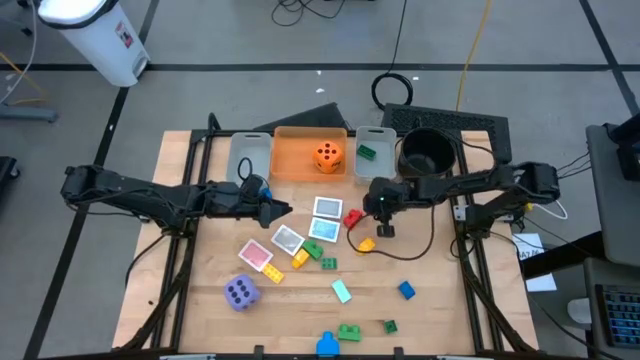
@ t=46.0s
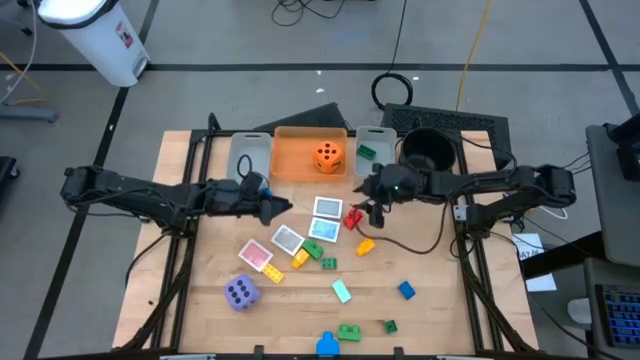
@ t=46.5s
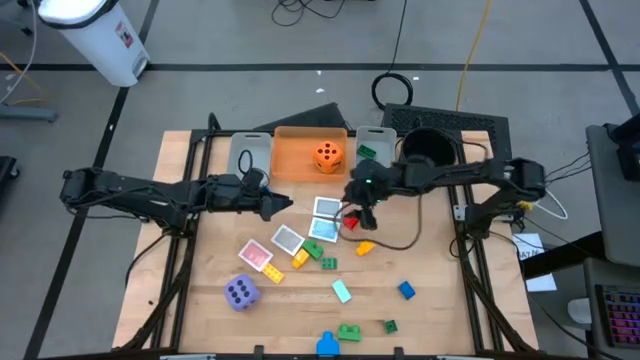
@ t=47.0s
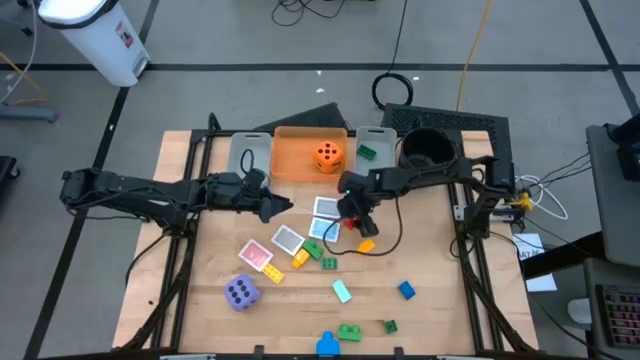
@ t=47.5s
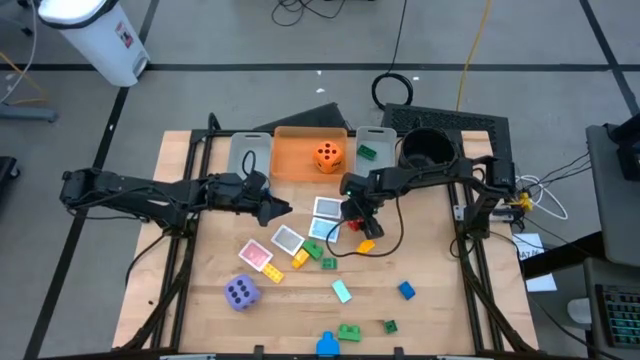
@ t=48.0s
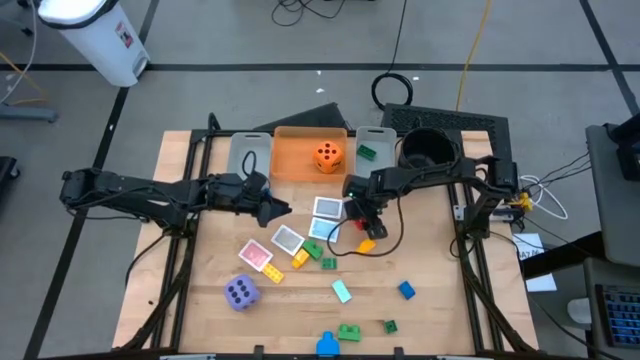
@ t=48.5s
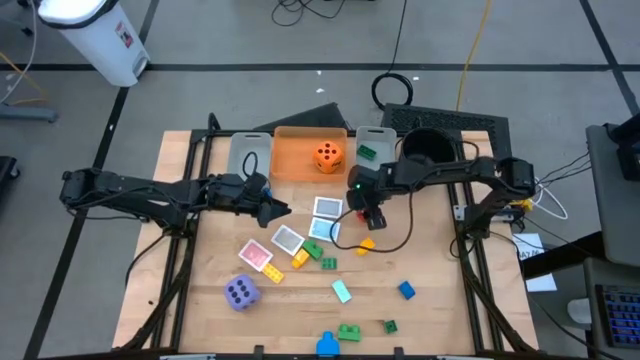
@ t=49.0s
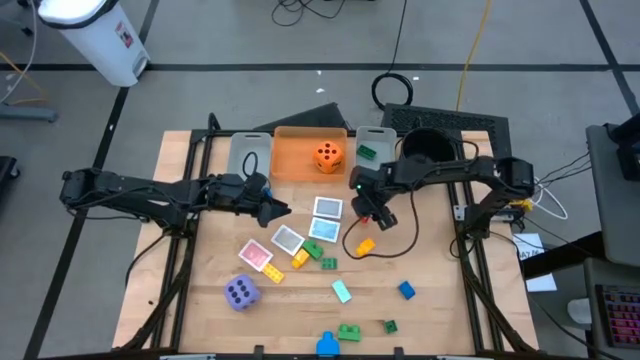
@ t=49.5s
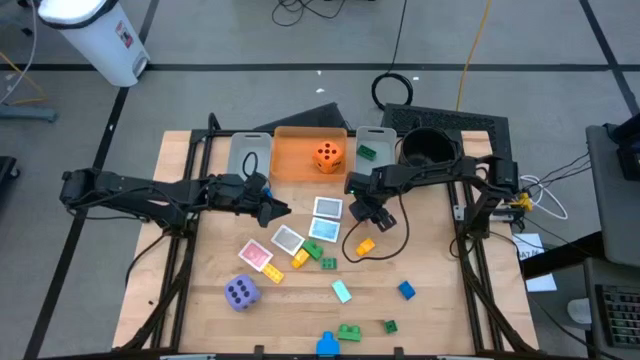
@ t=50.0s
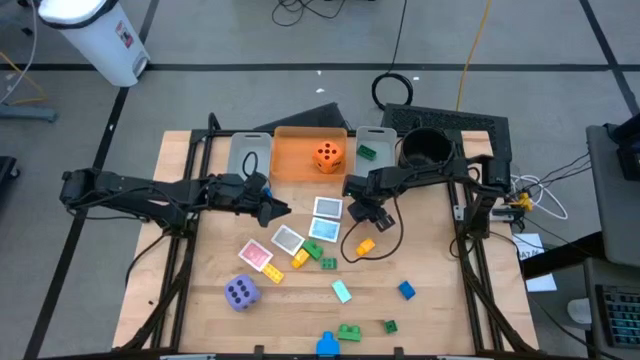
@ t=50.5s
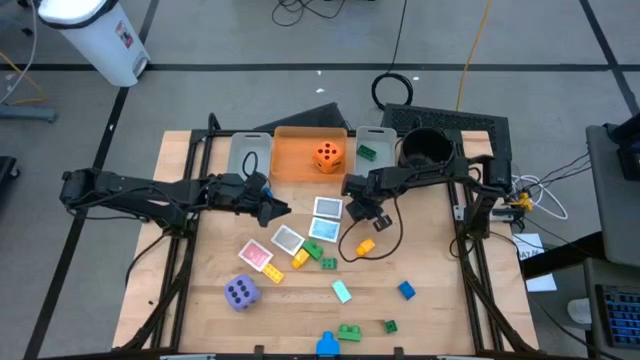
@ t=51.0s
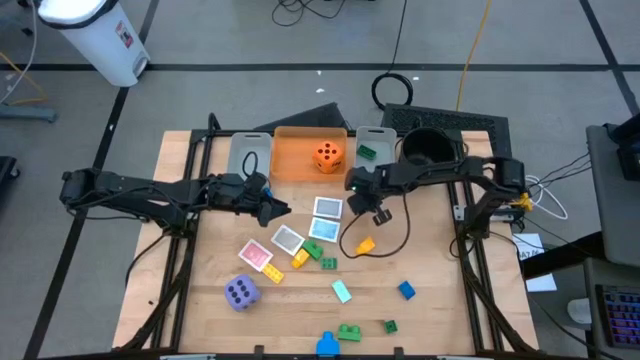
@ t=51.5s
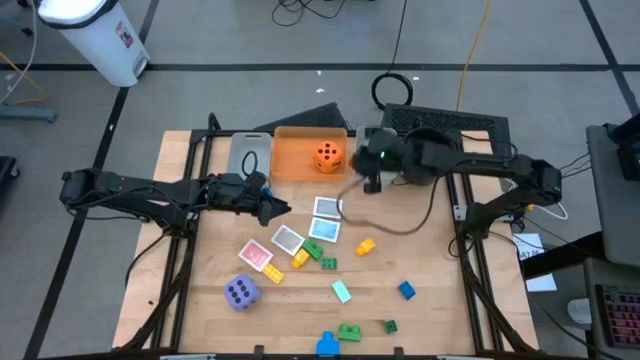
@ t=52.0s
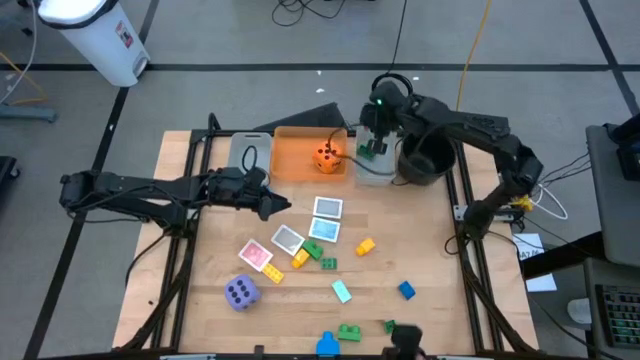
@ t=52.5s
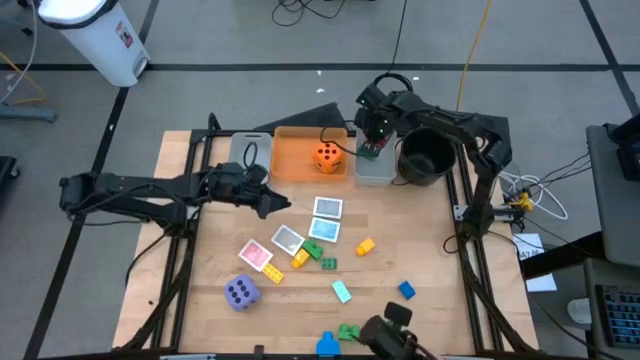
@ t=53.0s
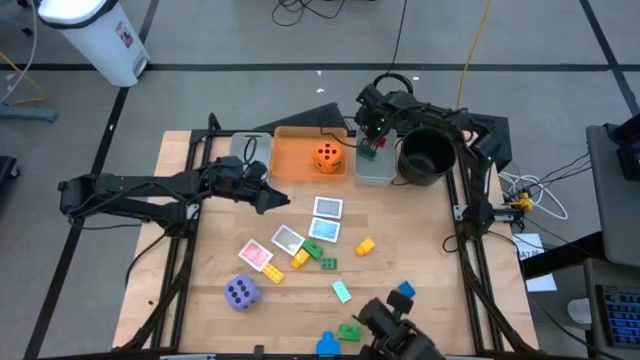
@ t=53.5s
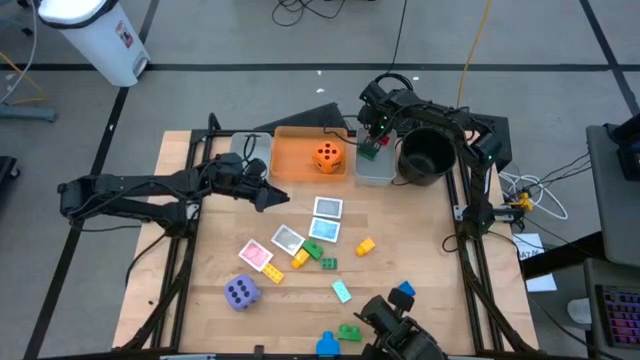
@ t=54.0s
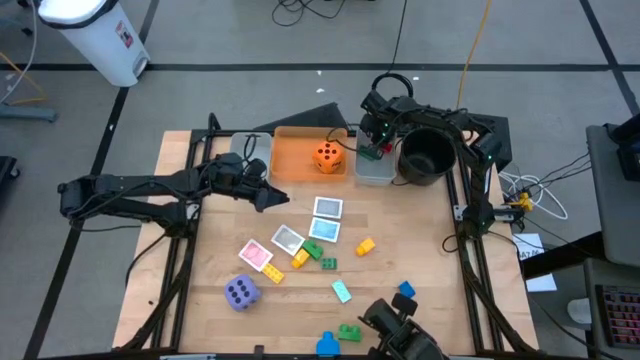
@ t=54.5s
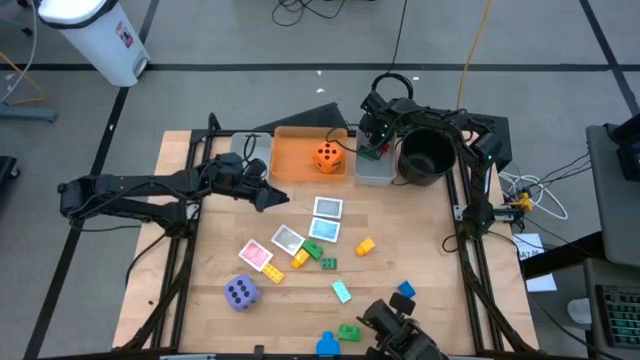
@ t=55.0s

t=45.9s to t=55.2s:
Task: Pick & Place Toys
Put the red game piece into the right gray bin

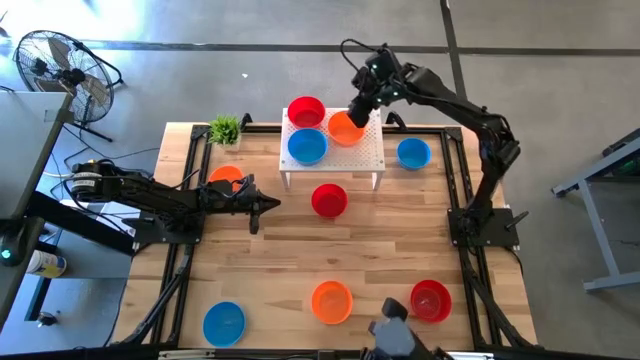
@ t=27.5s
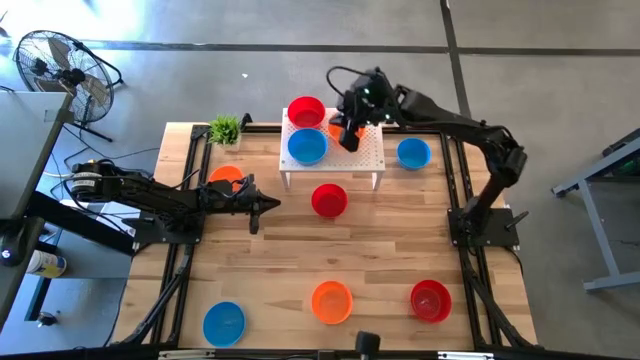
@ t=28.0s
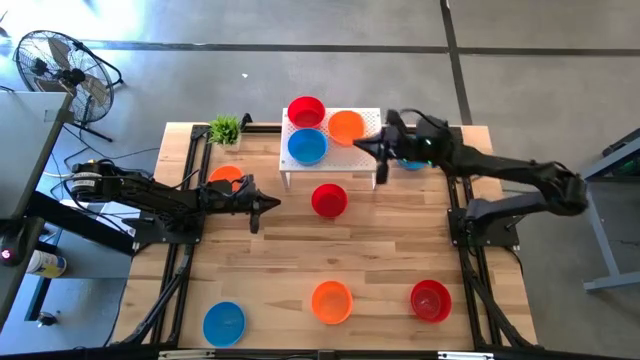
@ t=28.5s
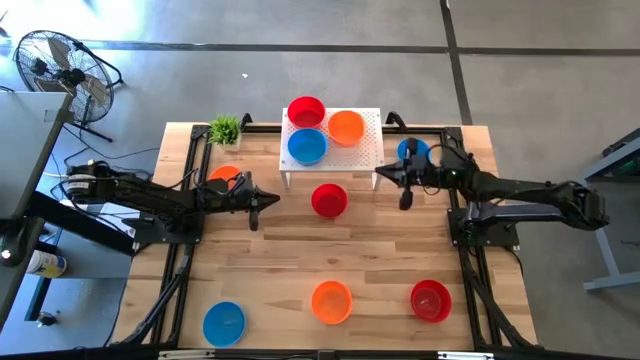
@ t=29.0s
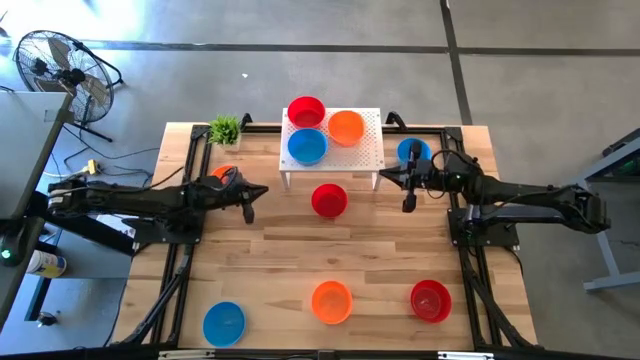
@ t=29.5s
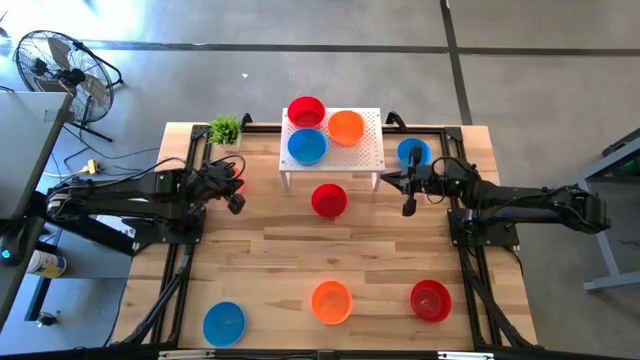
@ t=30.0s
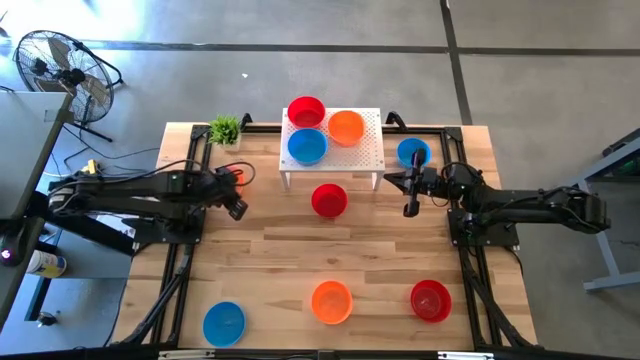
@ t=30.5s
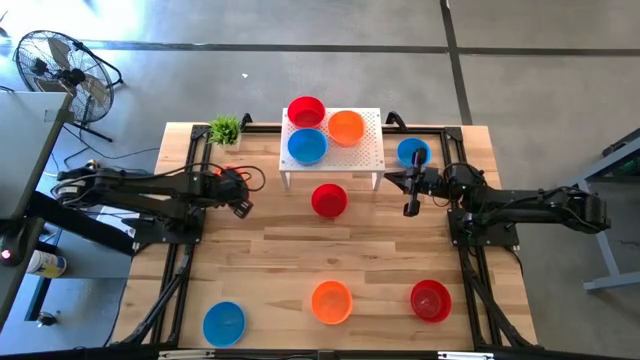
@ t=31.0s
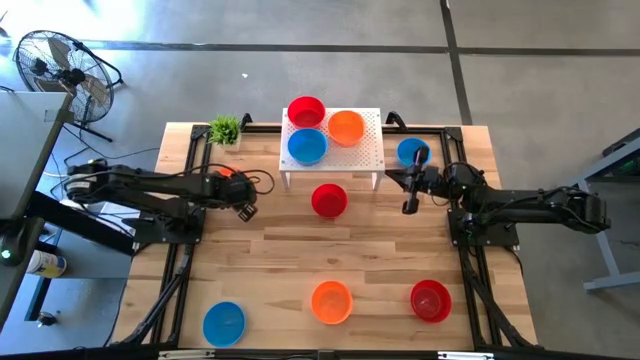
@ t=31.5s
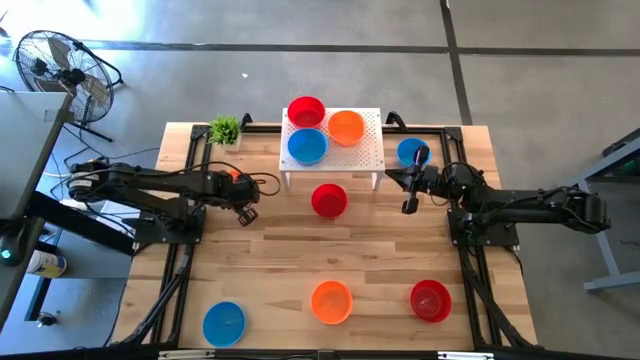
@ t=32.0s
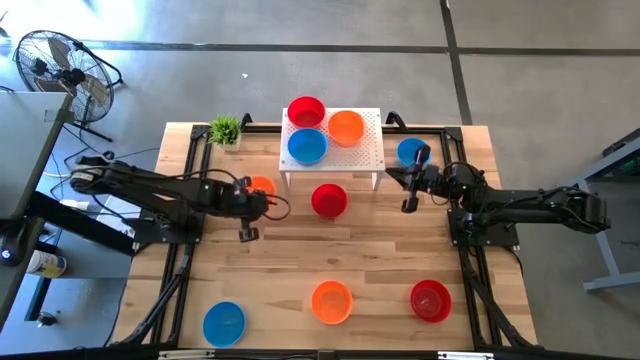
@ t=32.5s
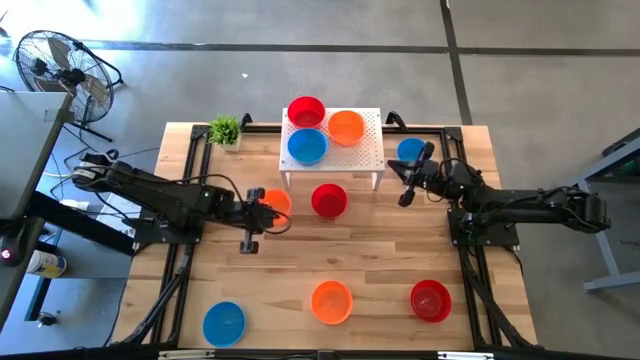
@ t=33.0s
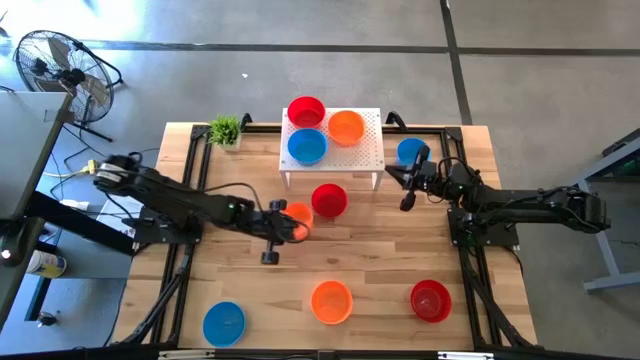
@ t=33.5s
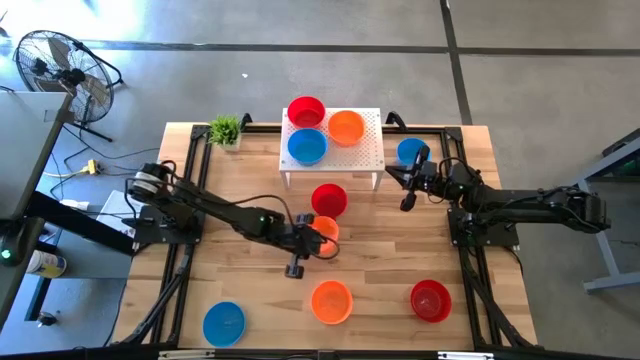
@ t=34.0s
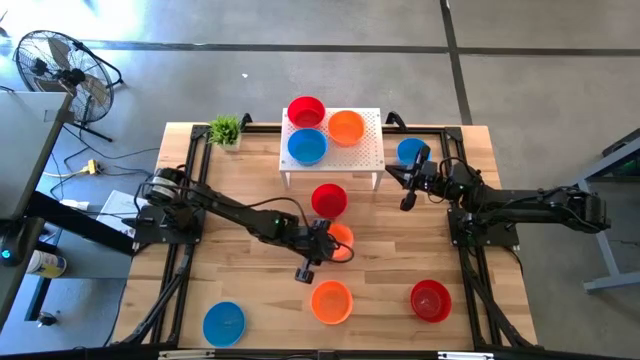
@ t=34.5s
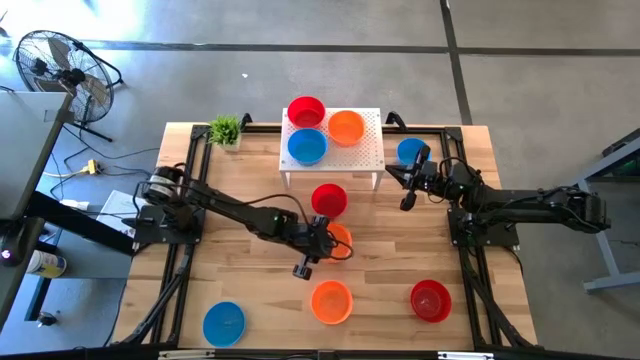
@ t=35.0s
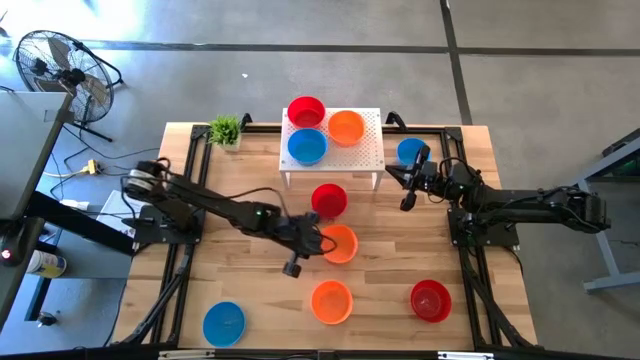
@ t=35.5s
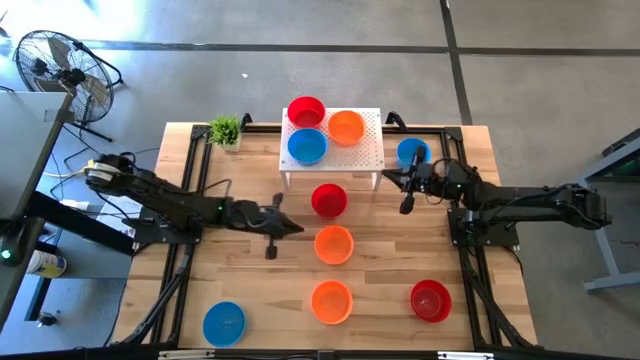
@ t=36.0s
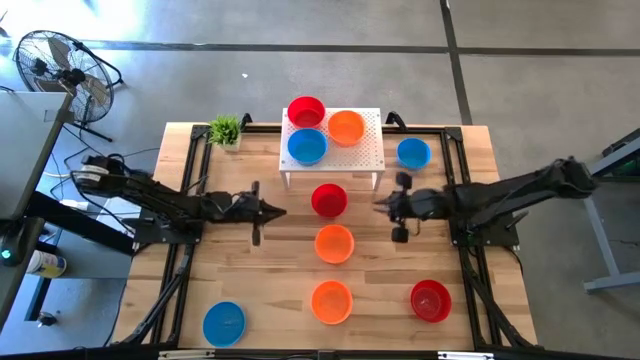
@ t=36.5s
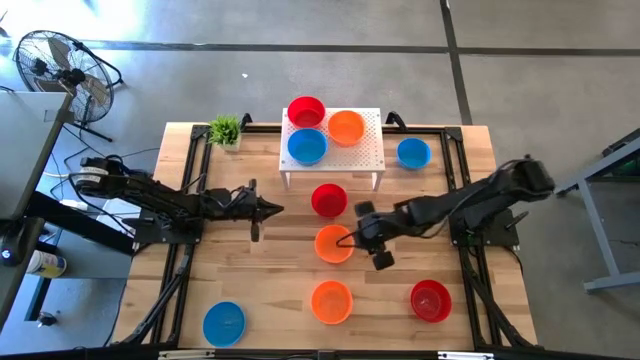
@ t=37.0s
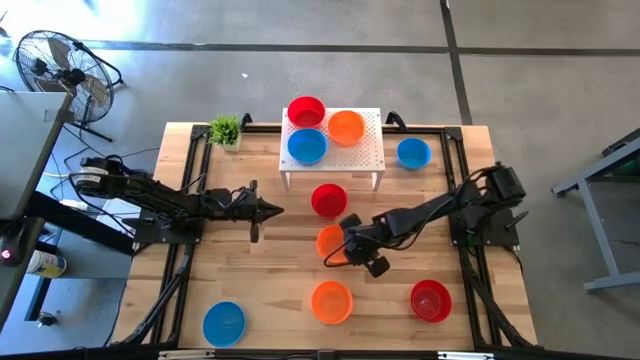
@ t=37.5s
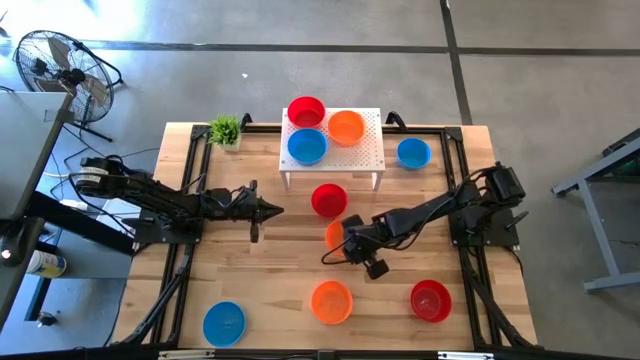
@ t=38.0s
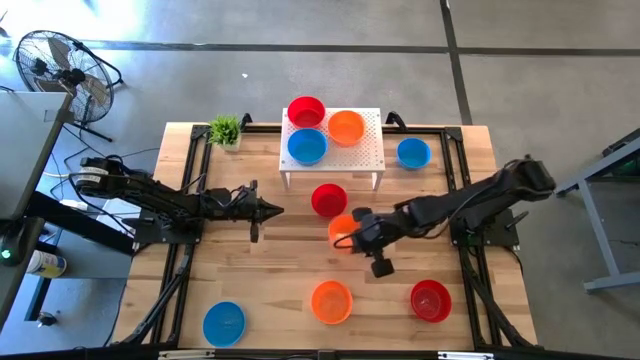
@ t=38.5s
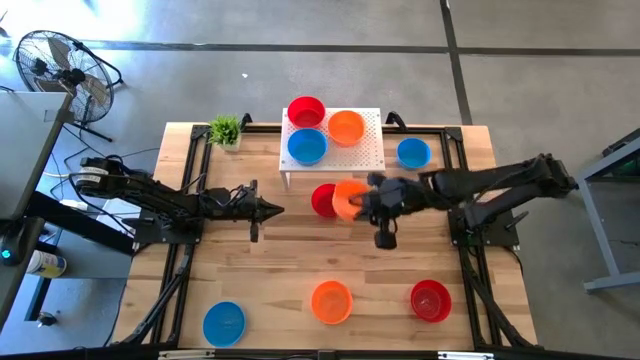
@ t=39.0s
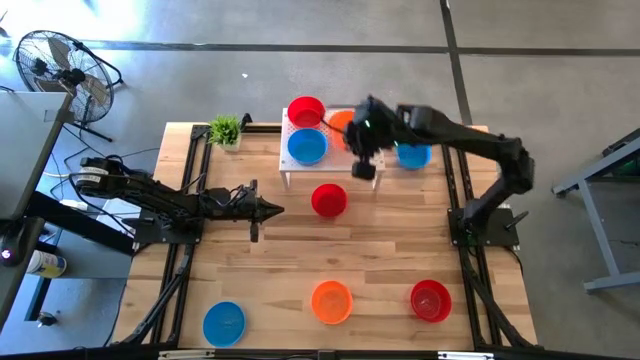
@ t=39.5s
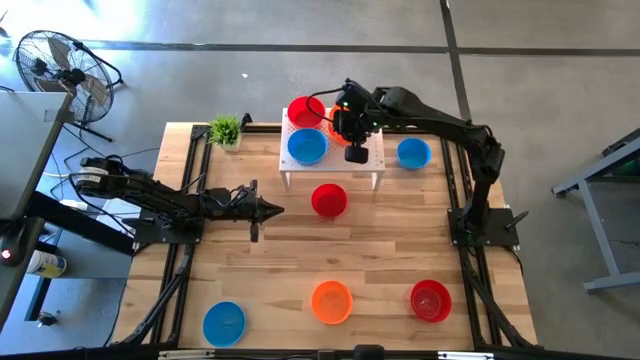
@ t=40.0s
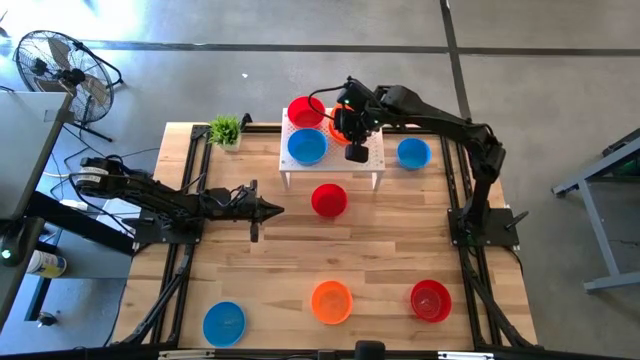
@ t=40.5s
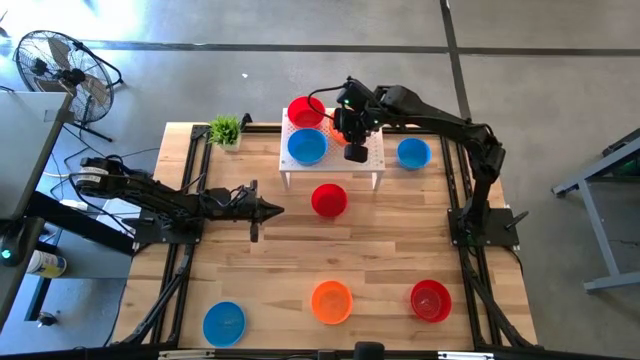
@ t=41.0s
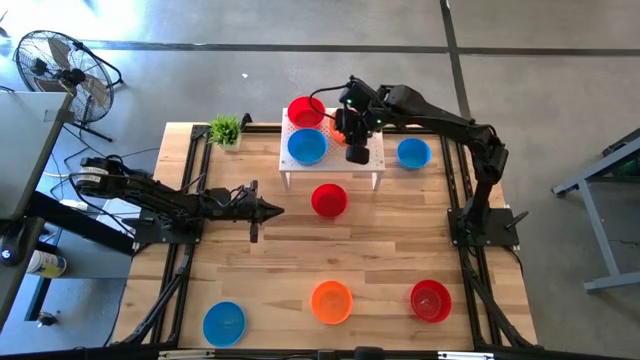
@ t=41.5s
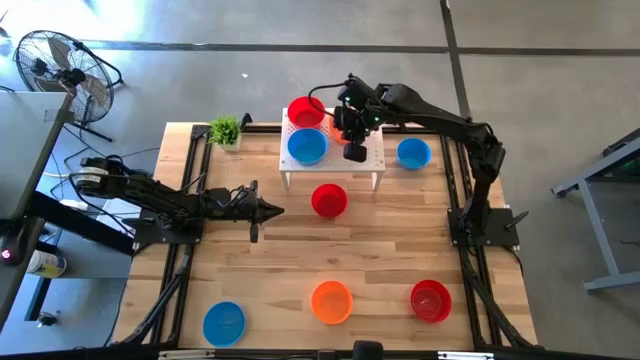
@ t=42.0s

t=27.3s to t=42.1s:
Task: Pick & Place Mini bowls
Stack the top orange bowl on top of the orange bowl on the shelf
